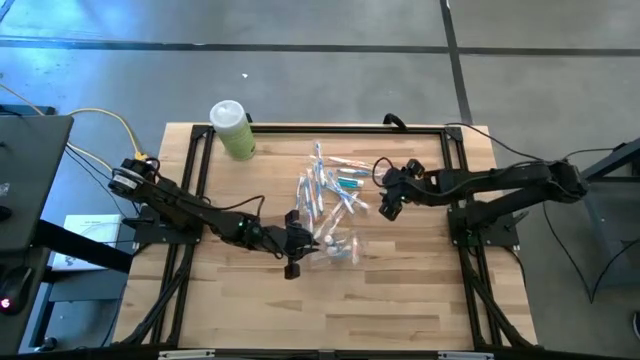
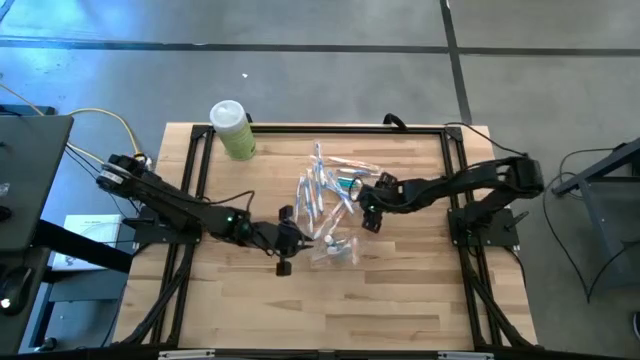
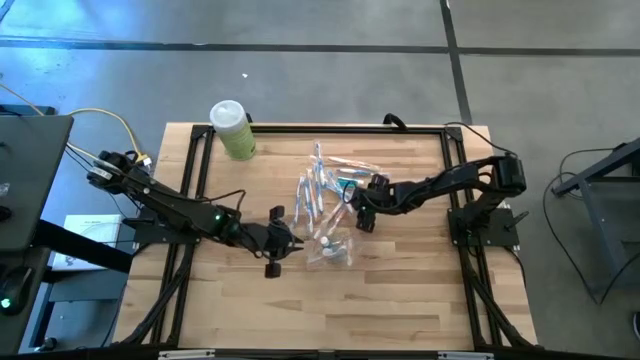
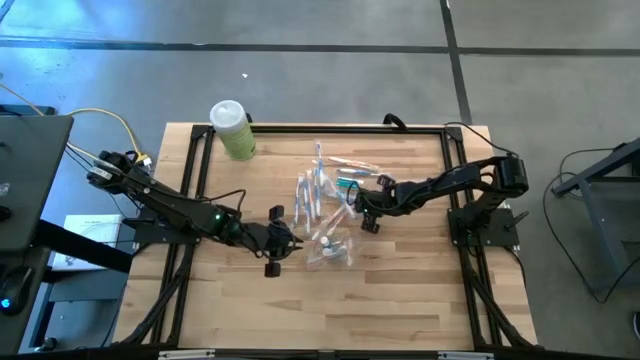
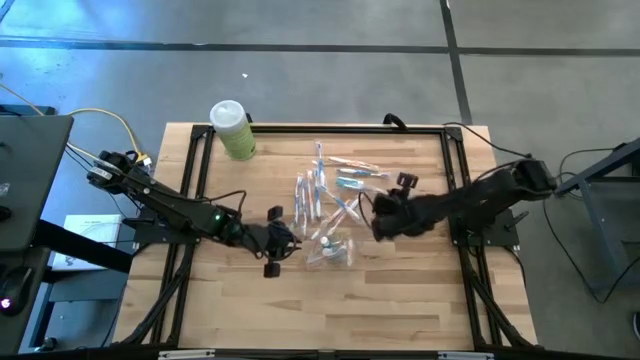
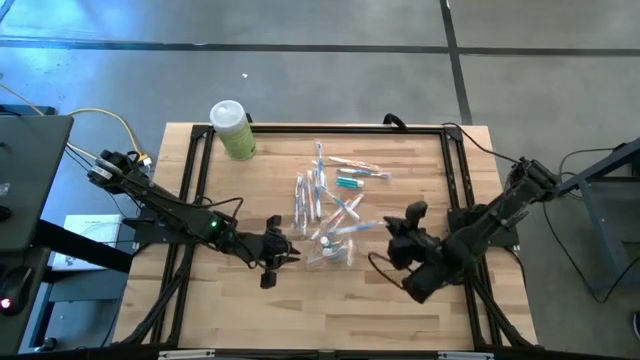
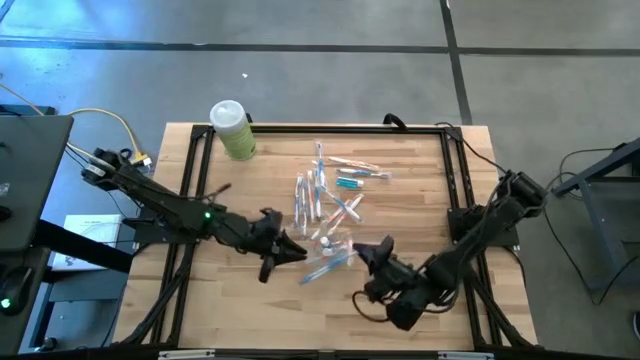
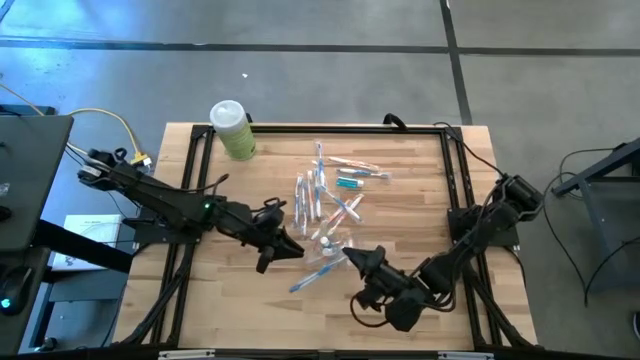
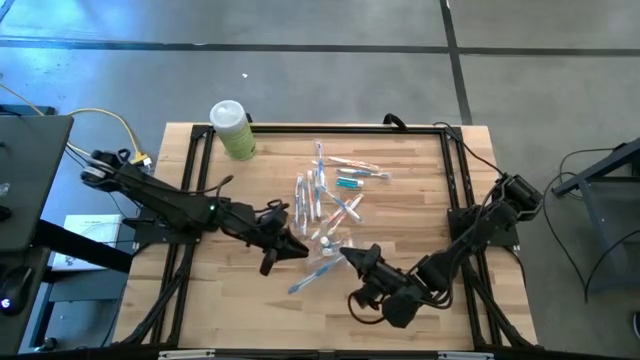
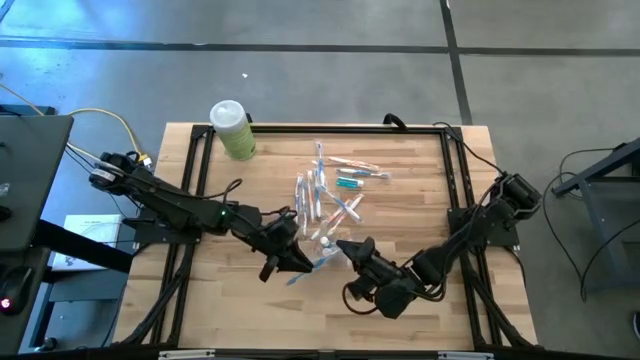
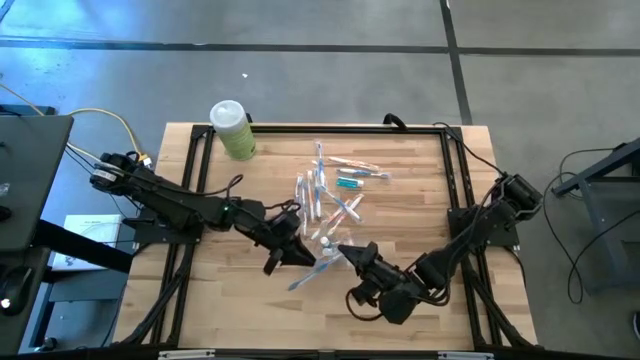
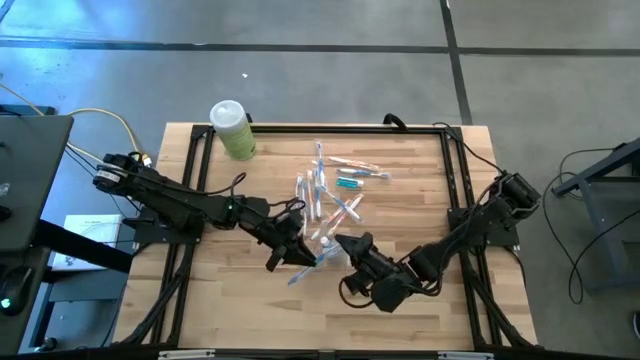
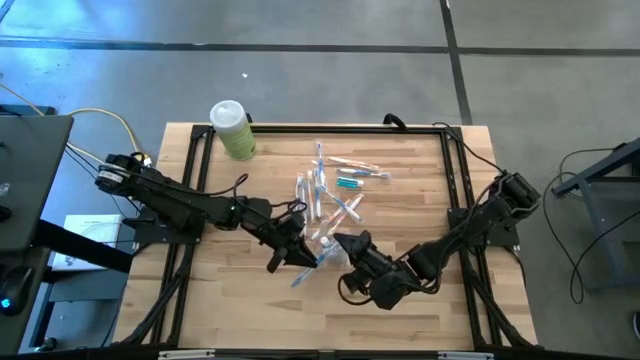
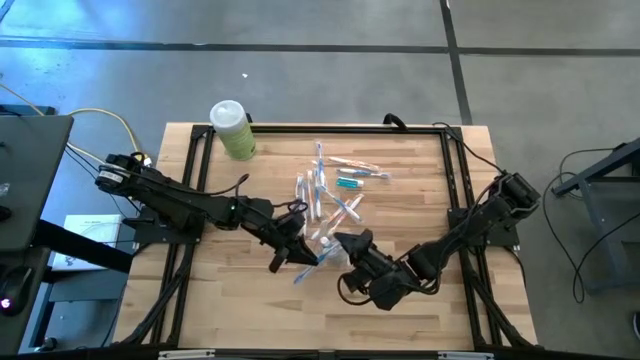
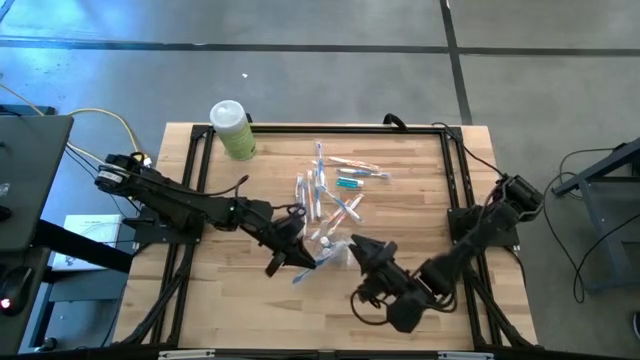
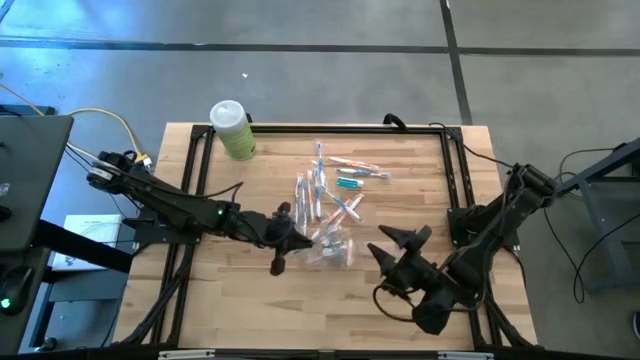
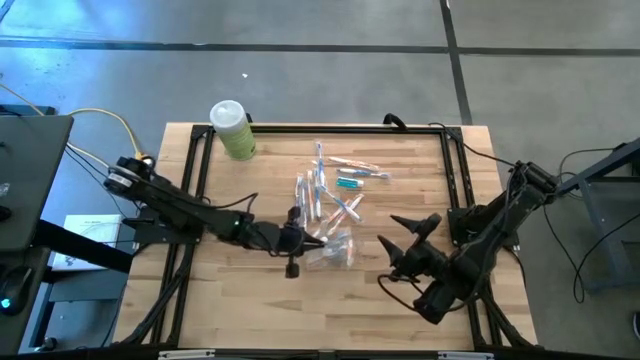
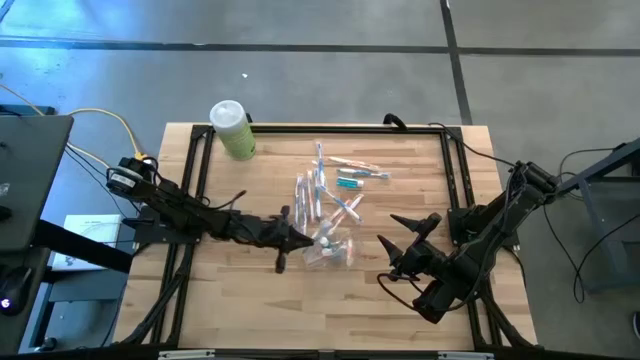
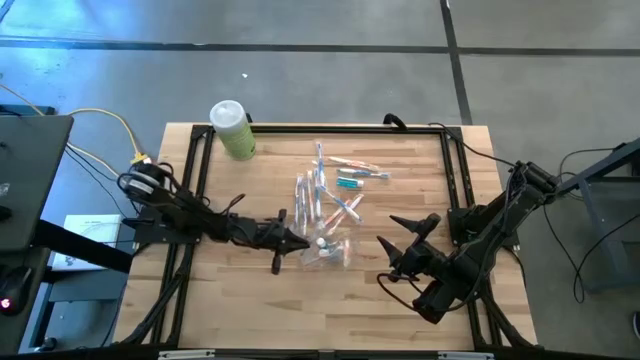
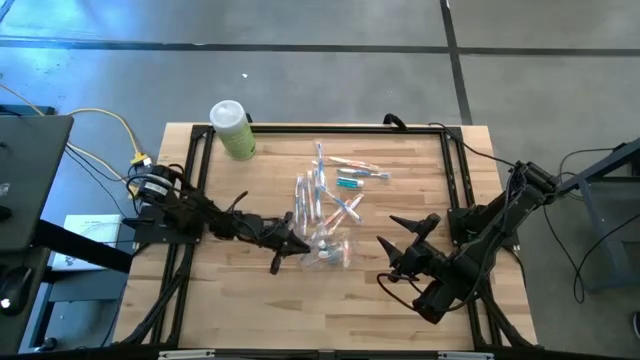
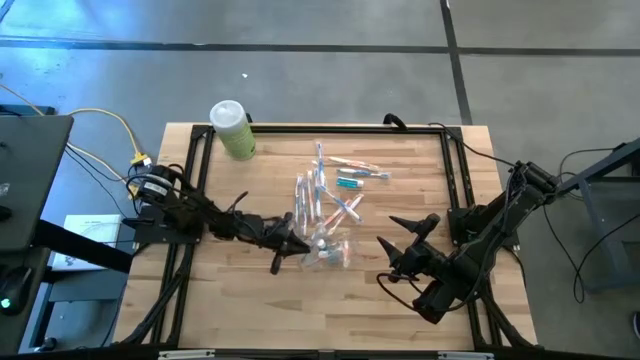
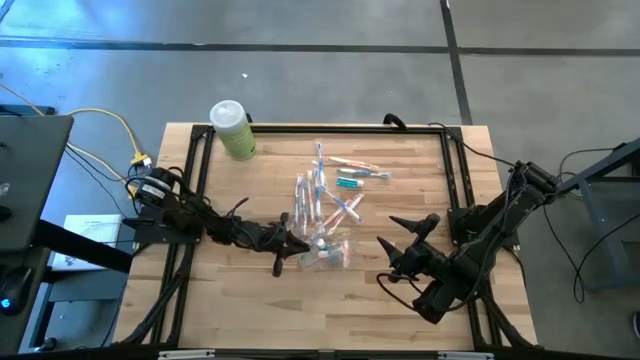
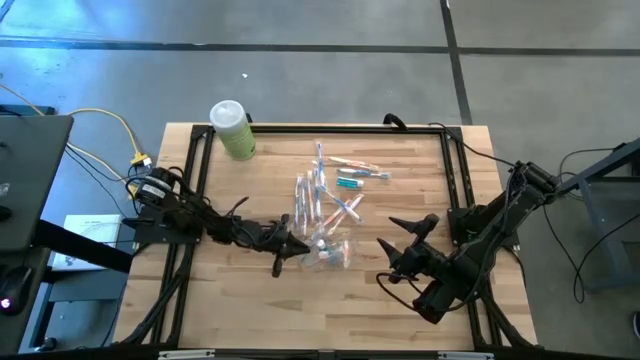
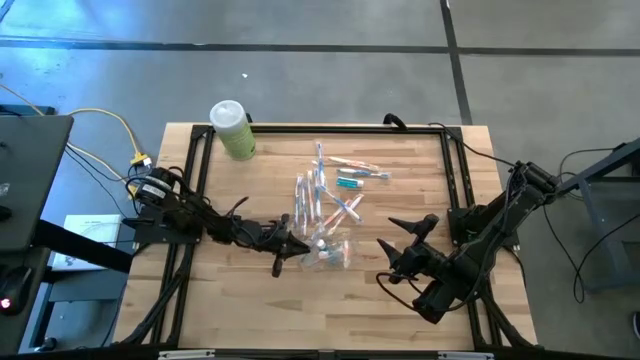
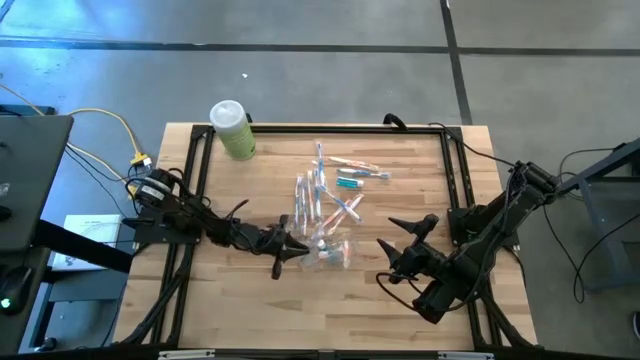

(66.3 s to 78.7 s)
Task: Pick & Place toothbrushing station
Put the blue toothbrush into the transparent organizer

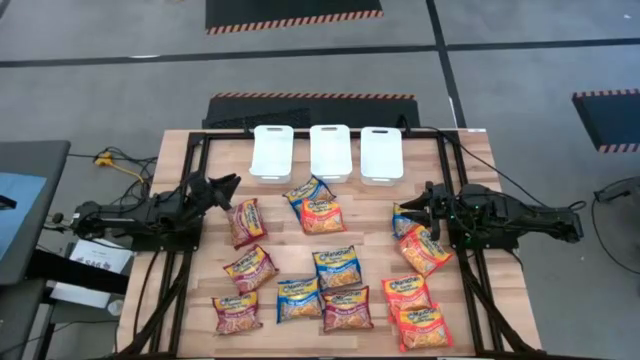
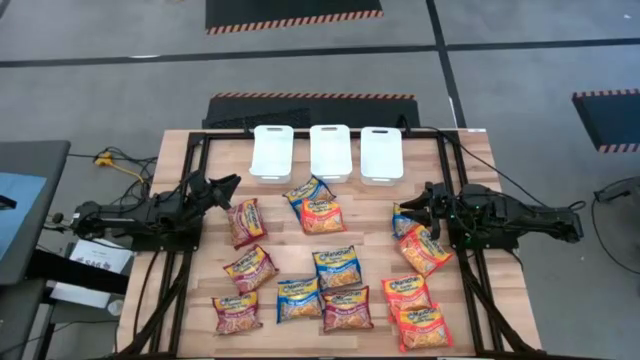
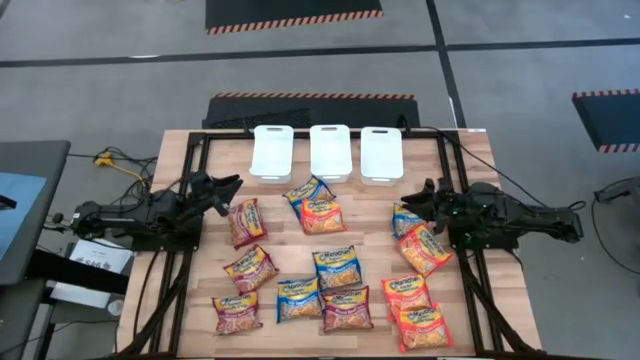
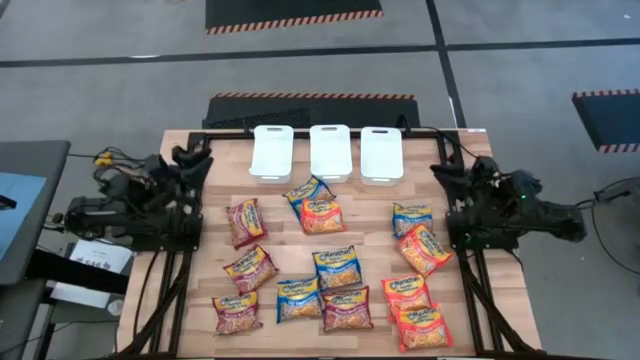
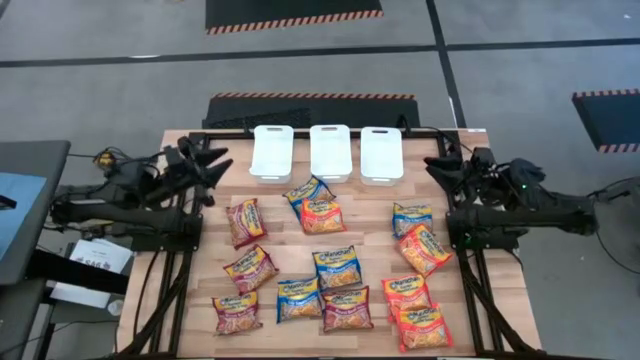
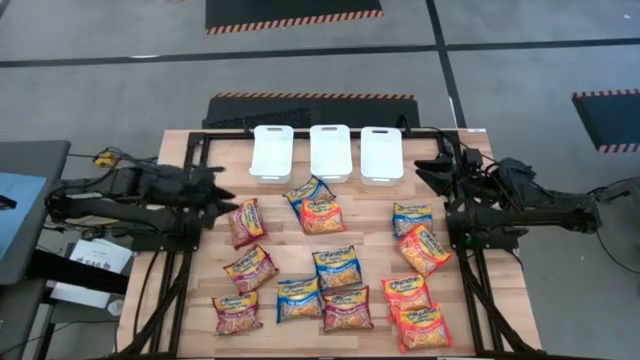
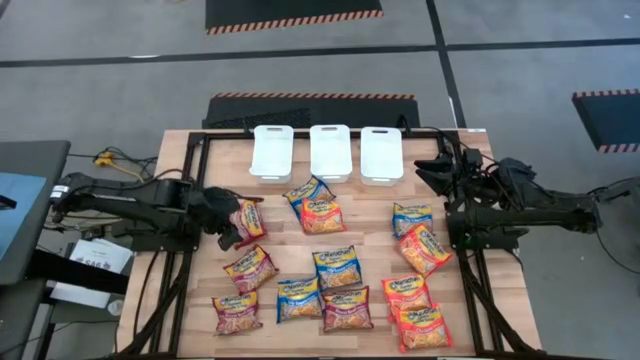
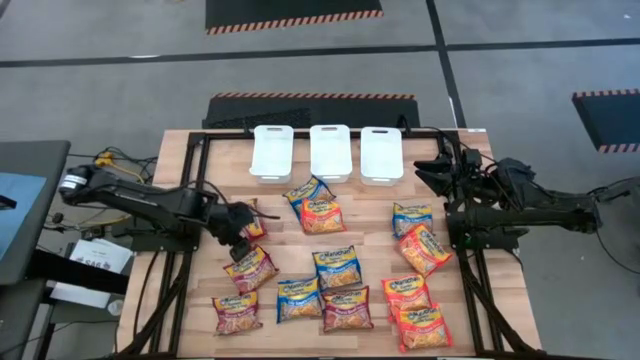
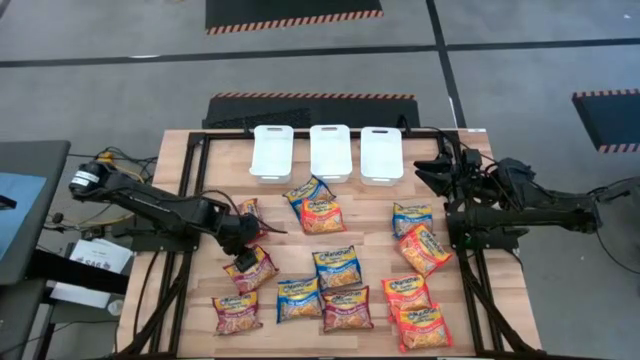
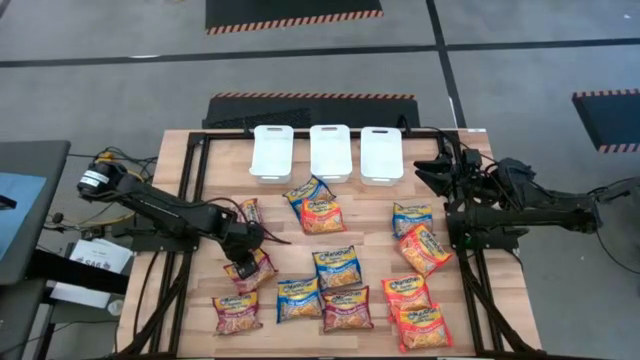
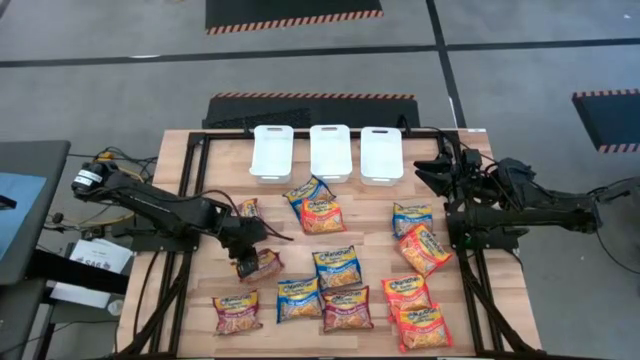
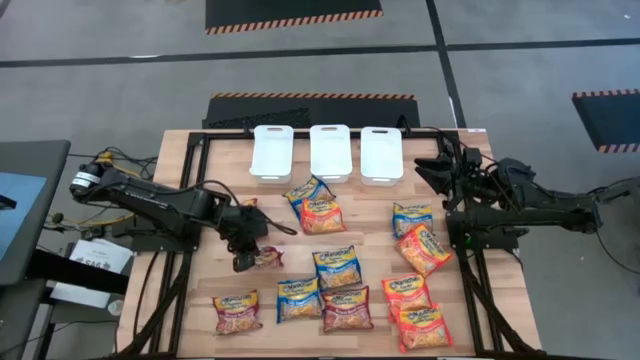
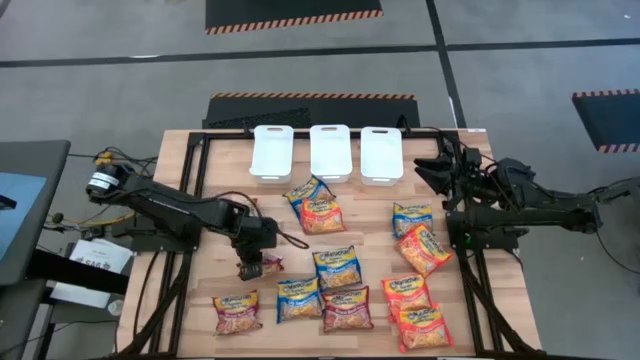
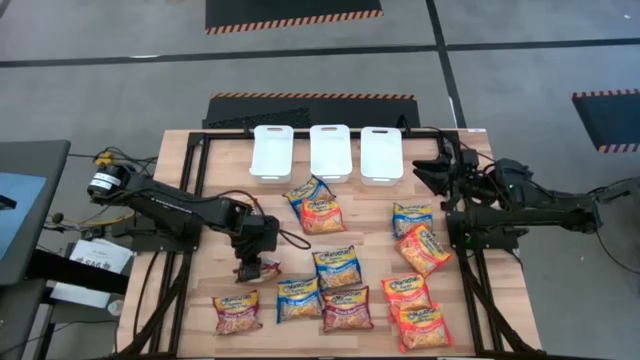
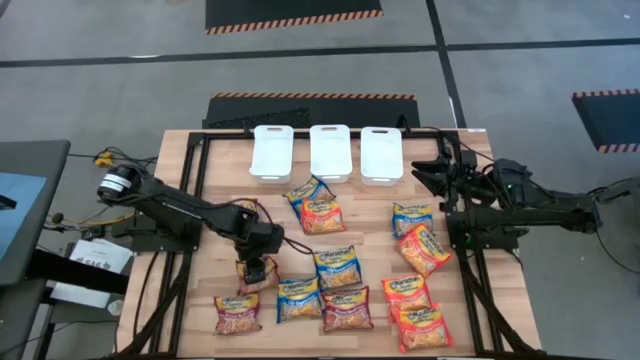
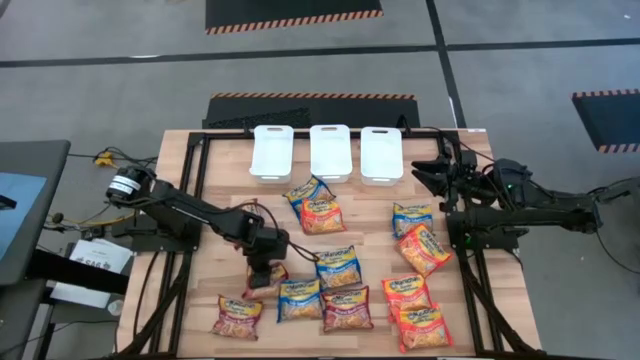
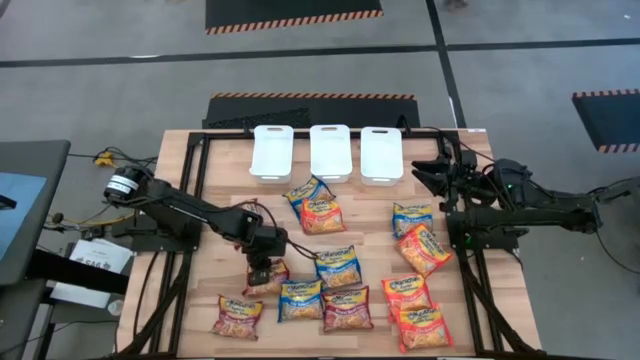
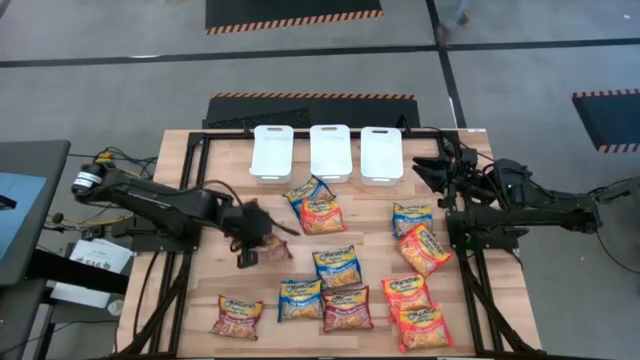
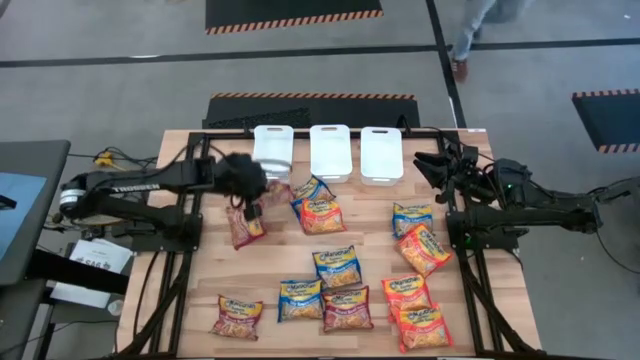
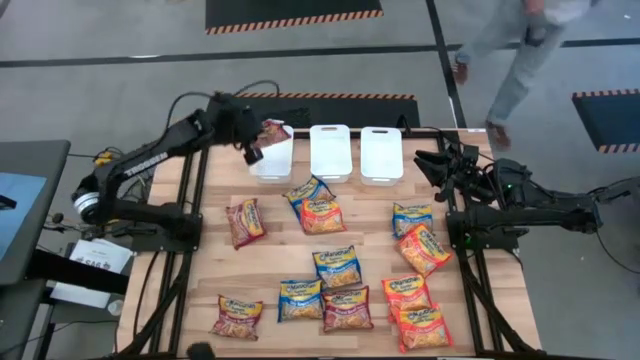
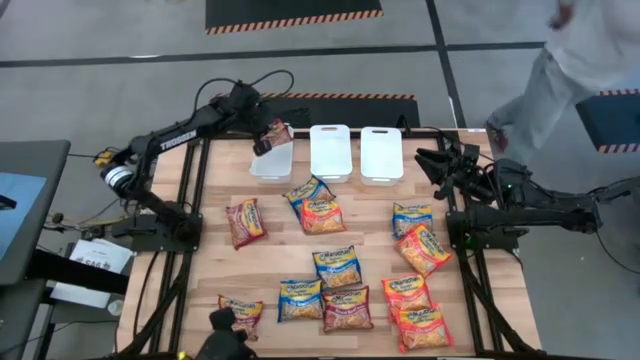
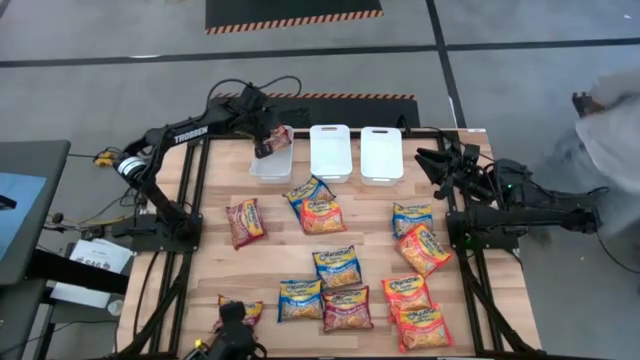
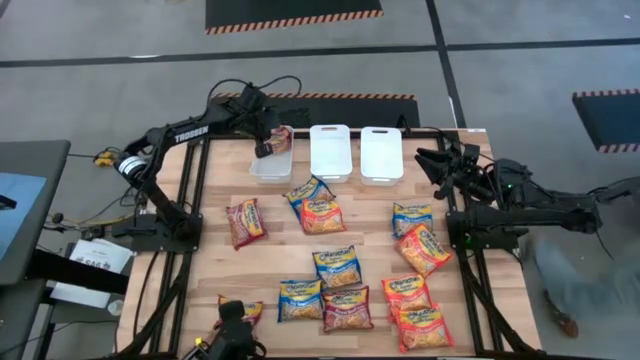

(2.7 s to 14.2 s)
Task: Sort Maruchan noodles
Put the red noodle pack into the left white bin
